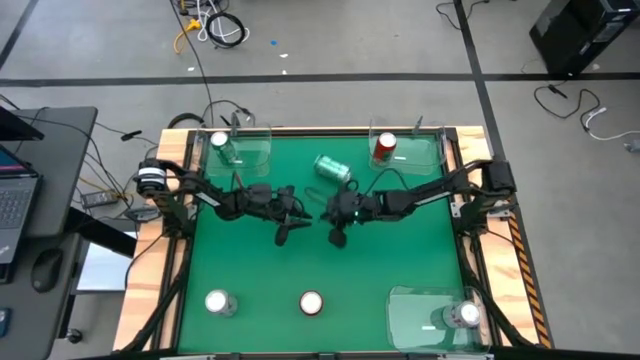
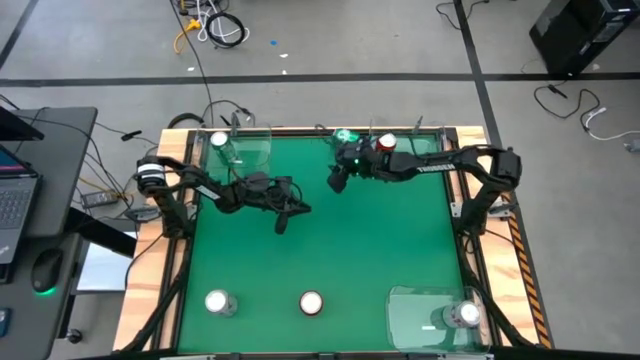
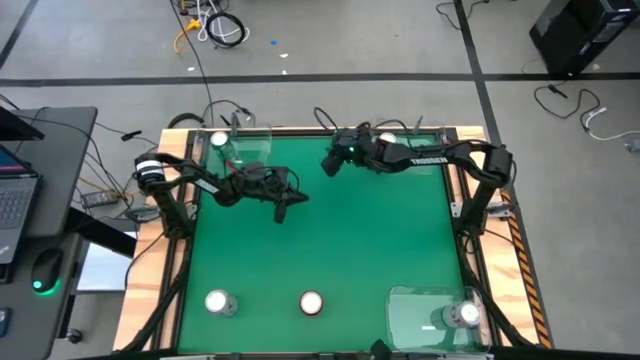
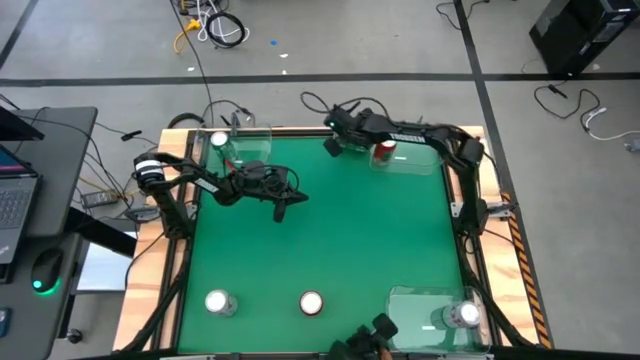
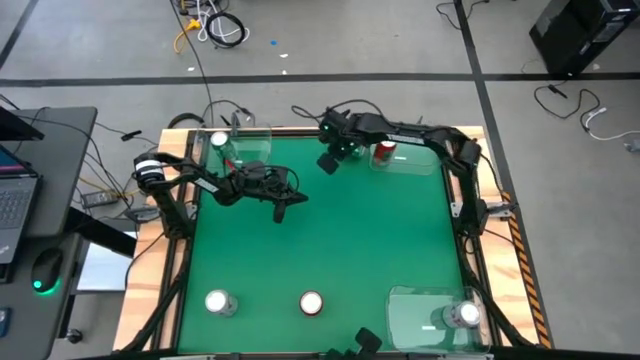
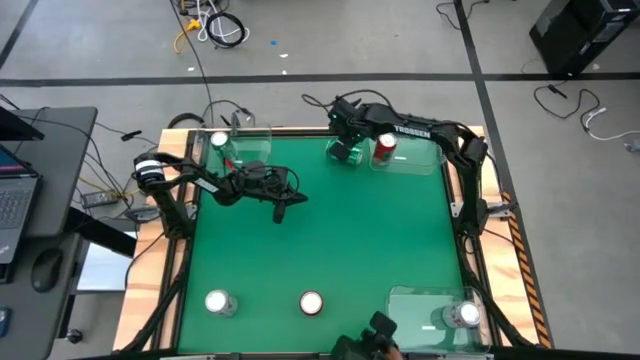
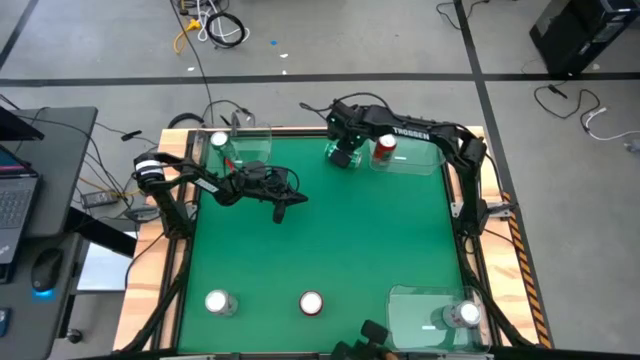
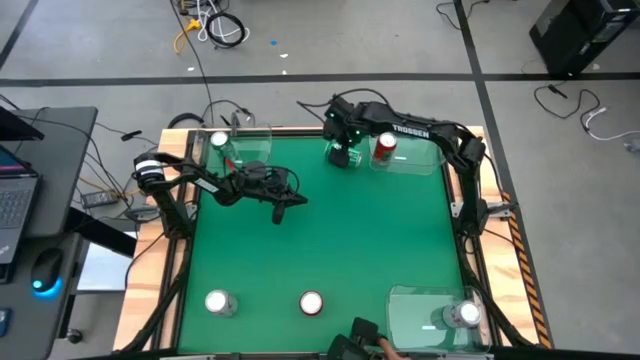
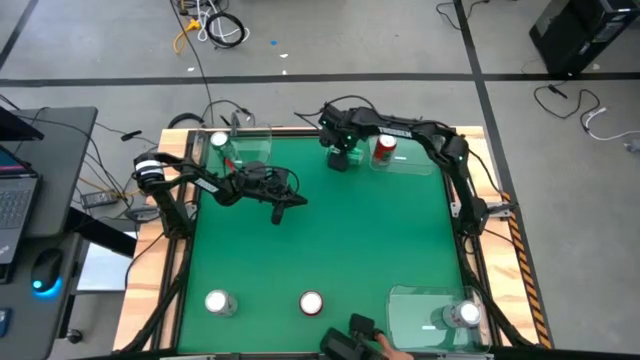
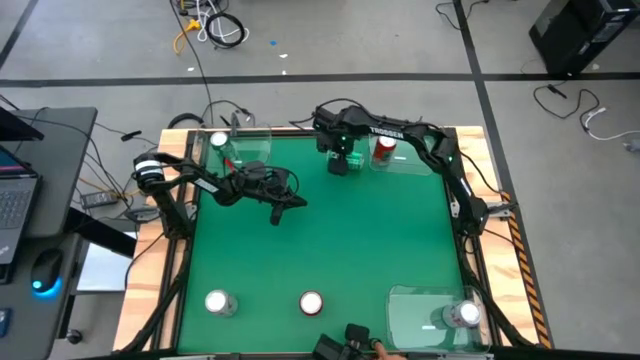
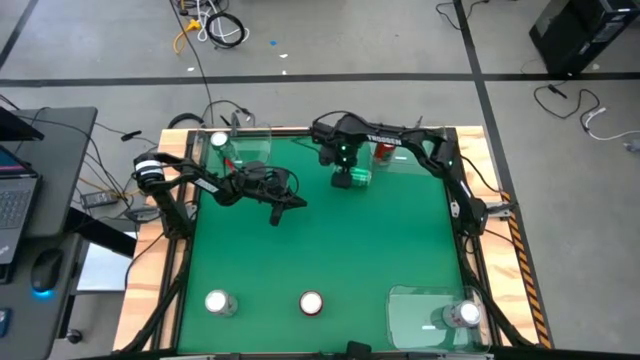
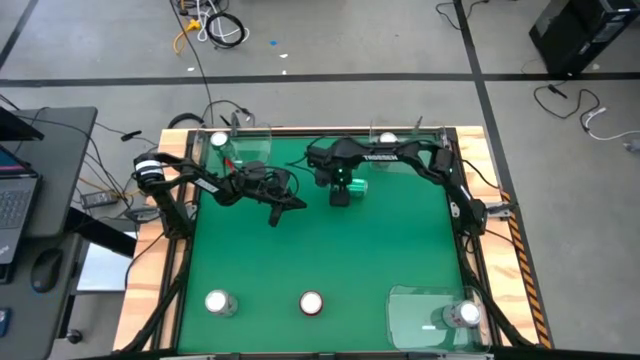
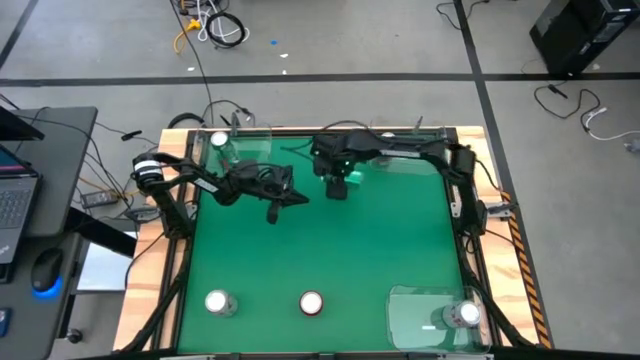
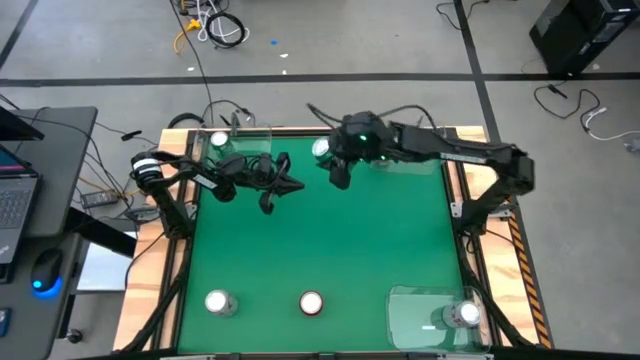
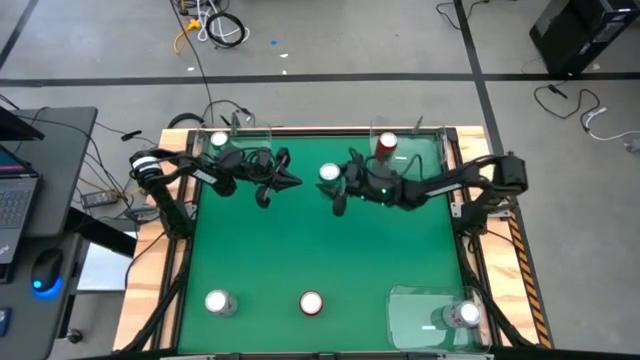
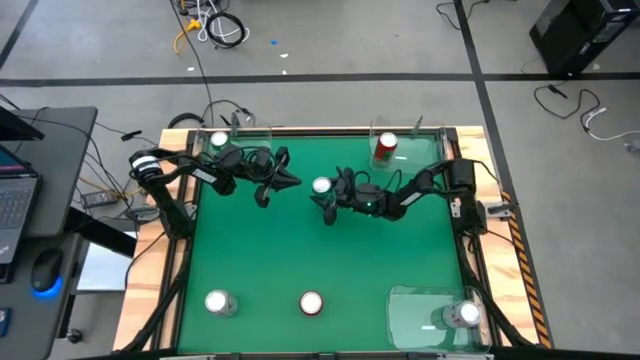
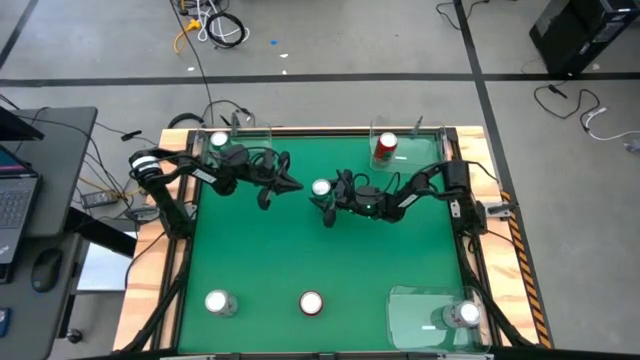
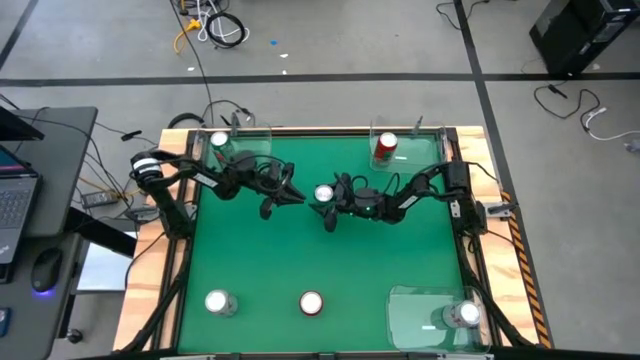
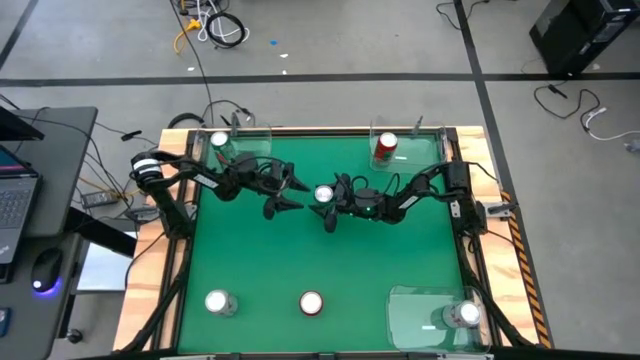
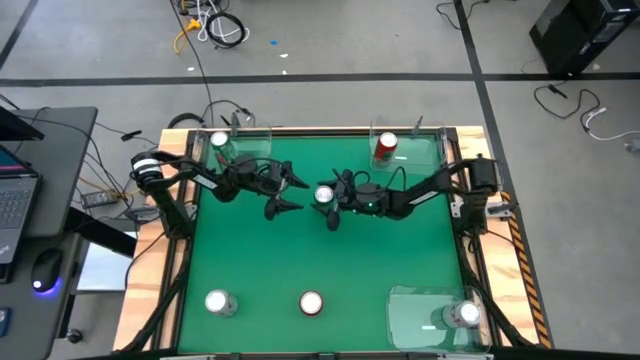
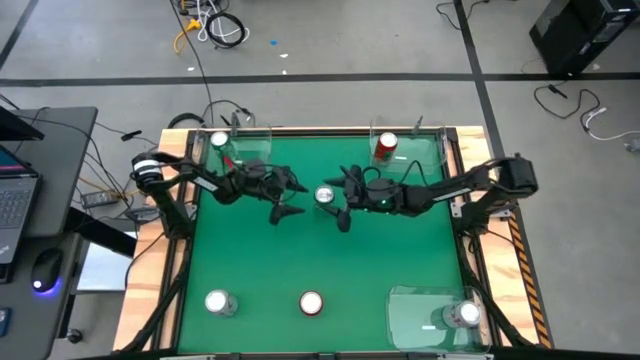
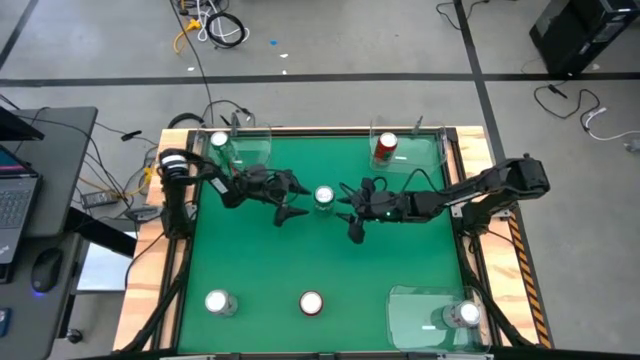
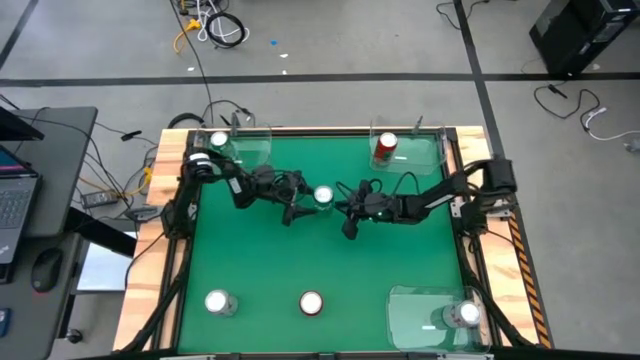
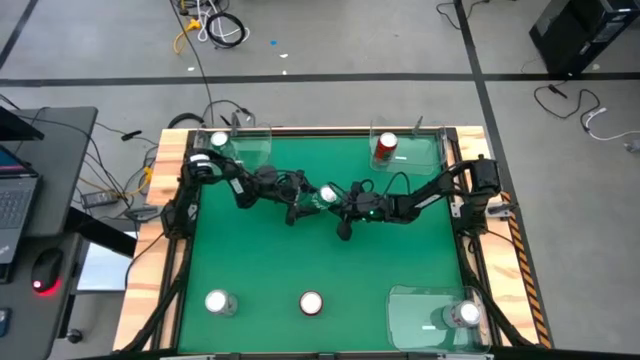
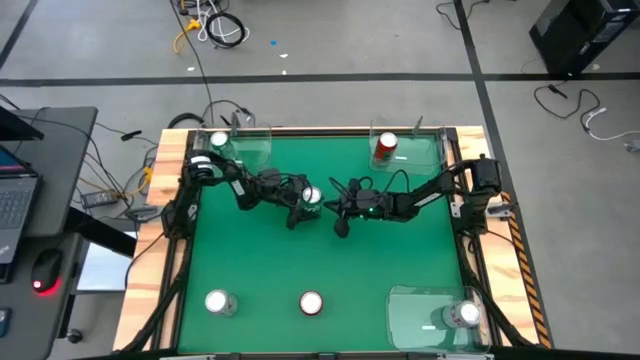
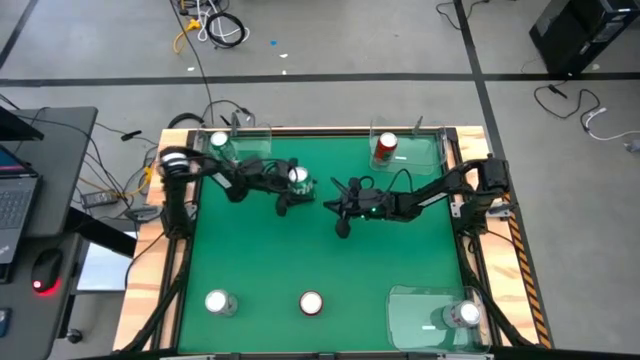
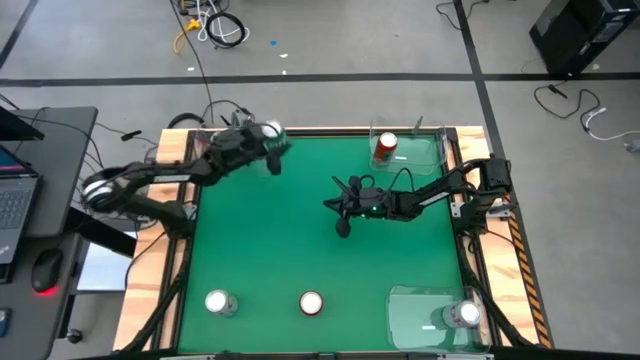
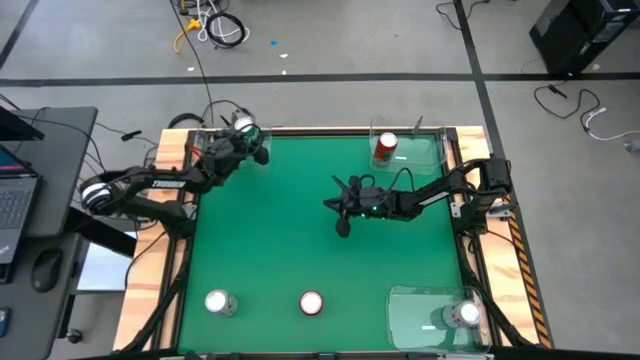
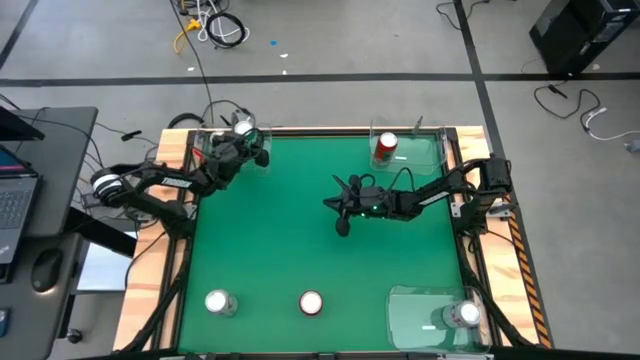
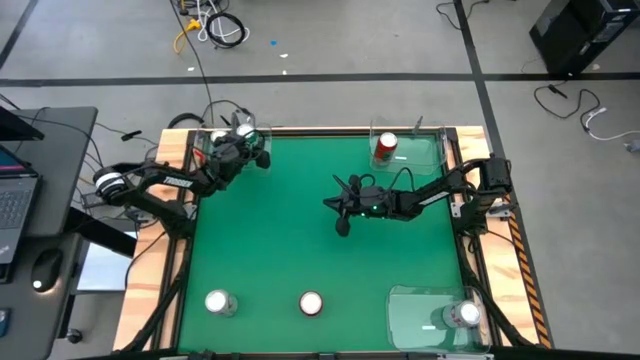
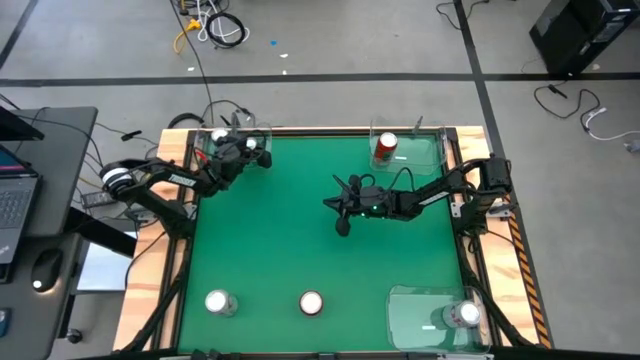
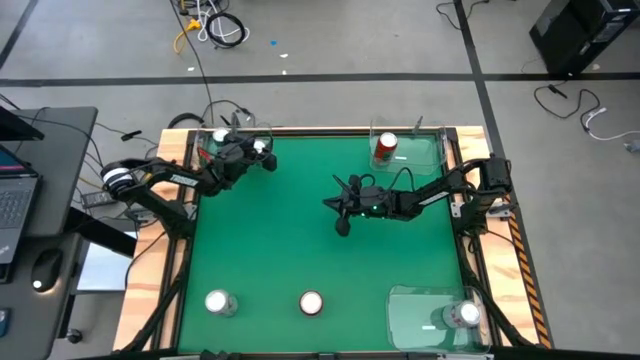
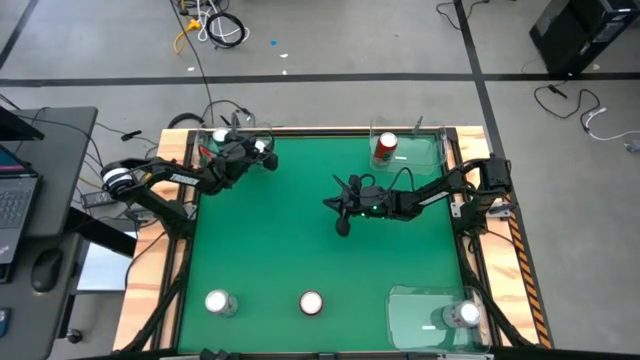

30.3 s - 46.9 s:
Task: Sort soda cans
Put the green soda can into the top left transparent bin

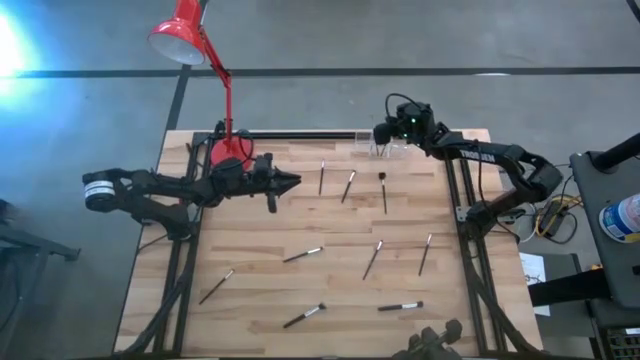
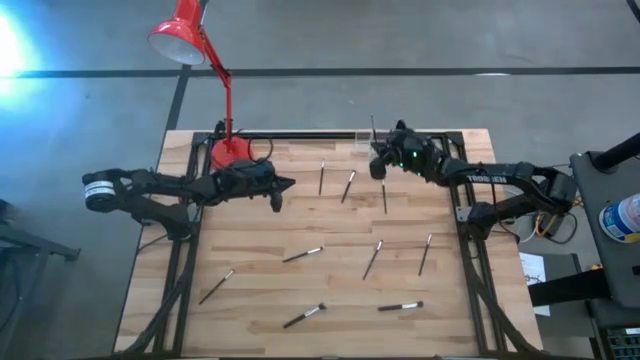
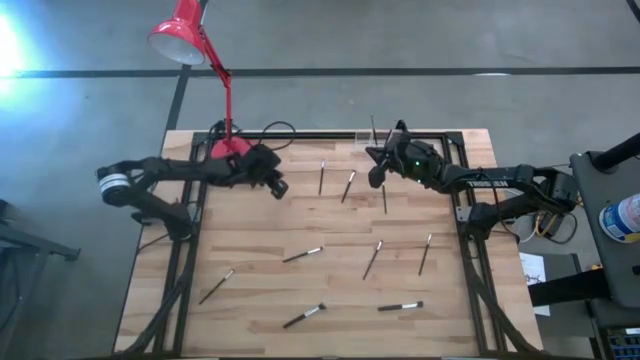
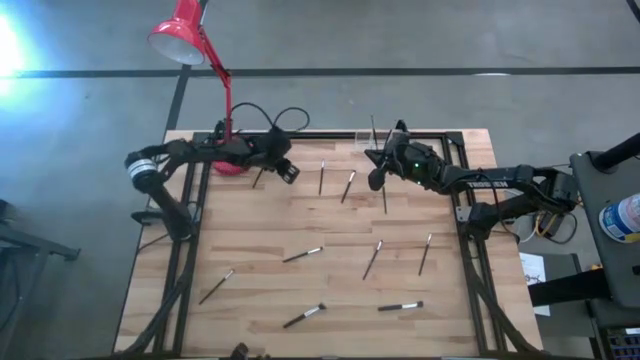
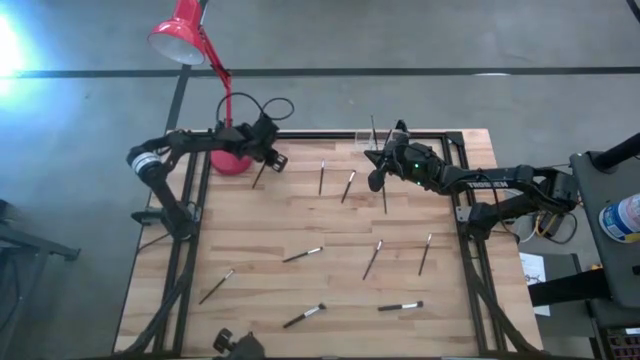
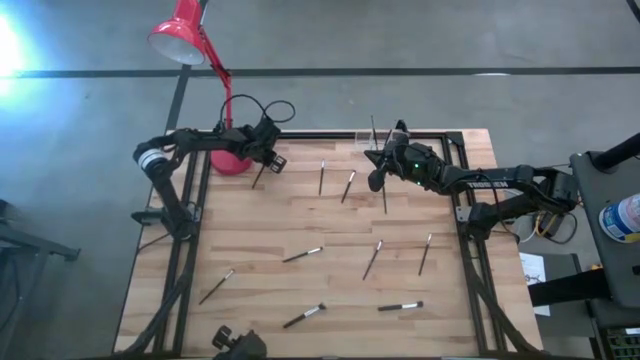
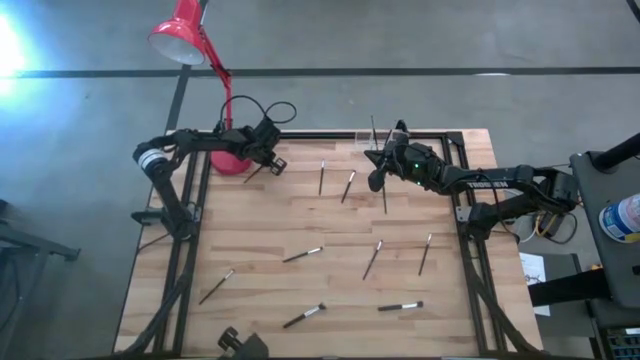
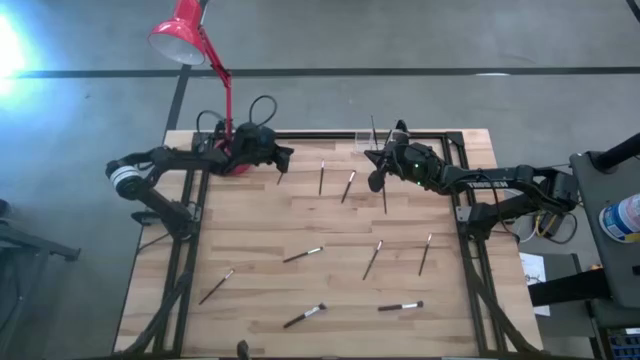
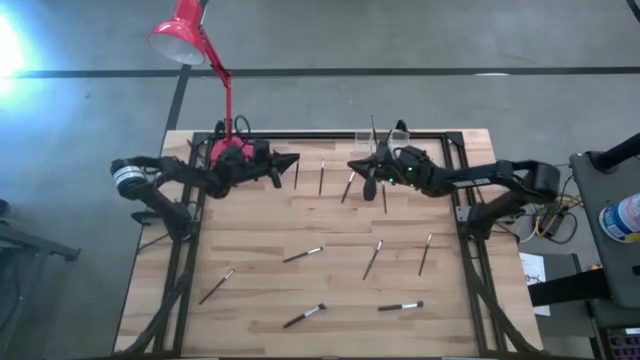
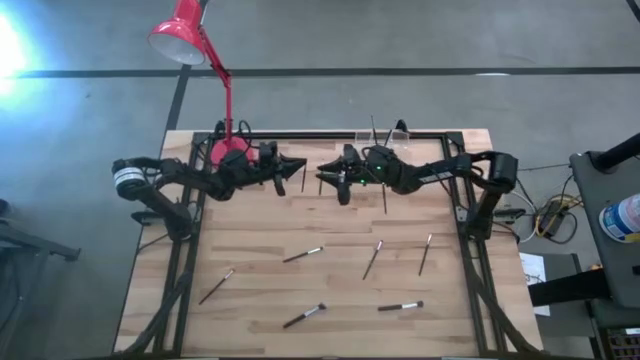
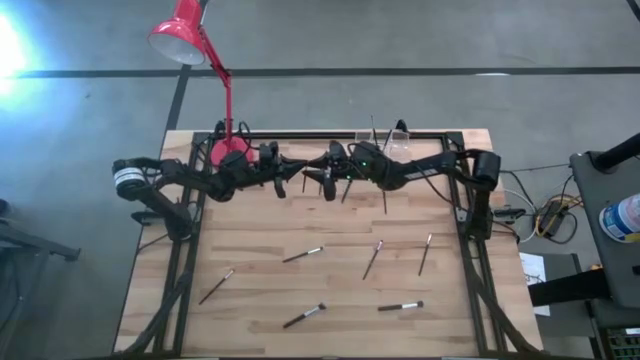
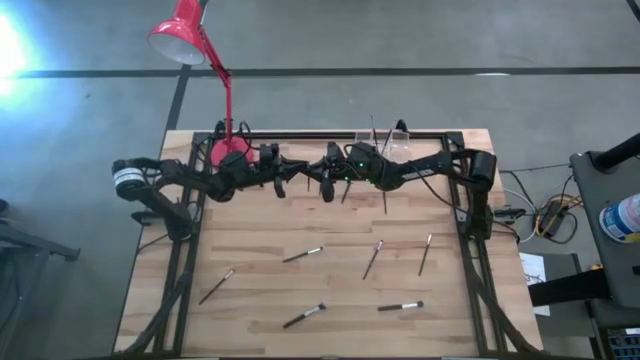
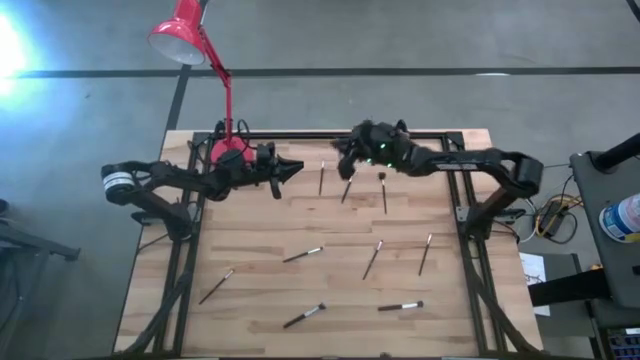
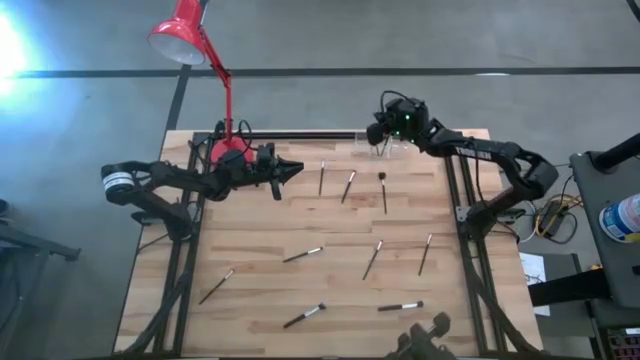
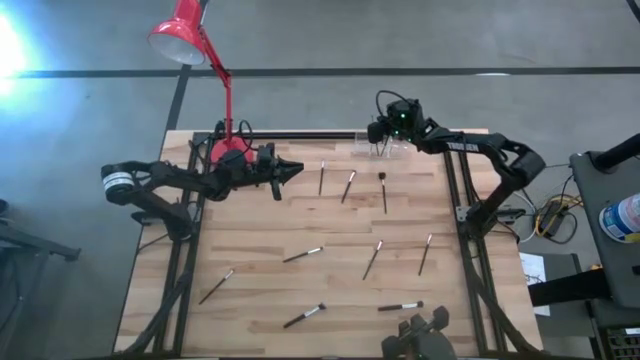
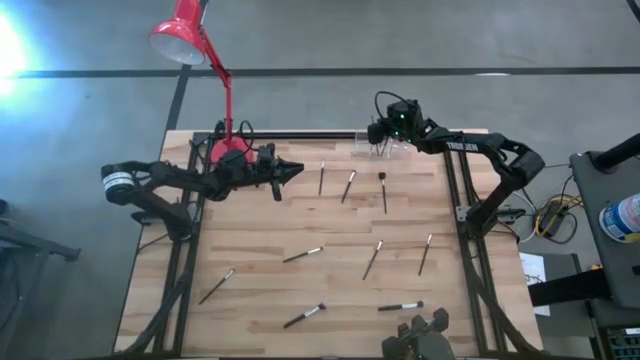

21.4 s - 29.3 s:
Task: Put items in baskets/containers
Put the eyeshadow brush into the transparent organizer
